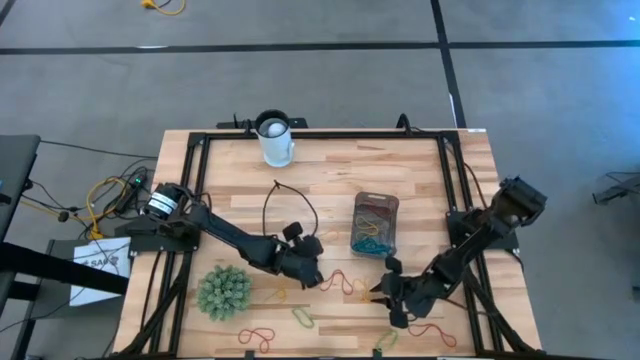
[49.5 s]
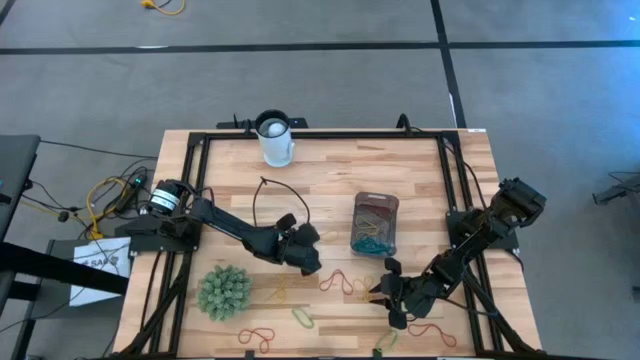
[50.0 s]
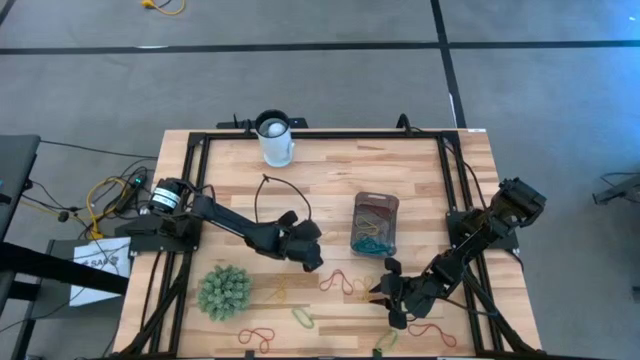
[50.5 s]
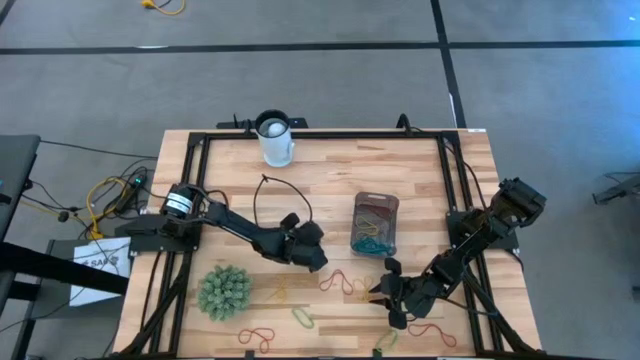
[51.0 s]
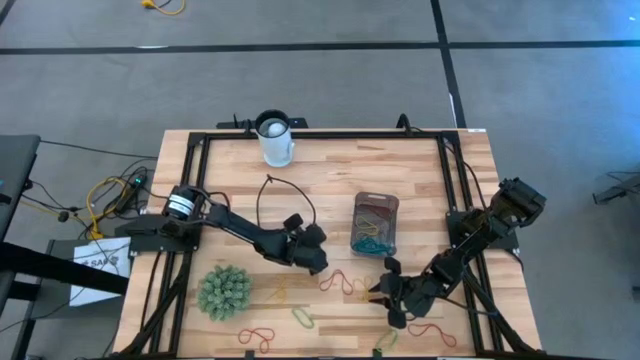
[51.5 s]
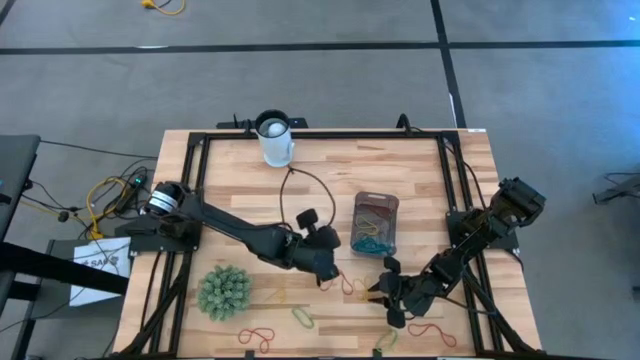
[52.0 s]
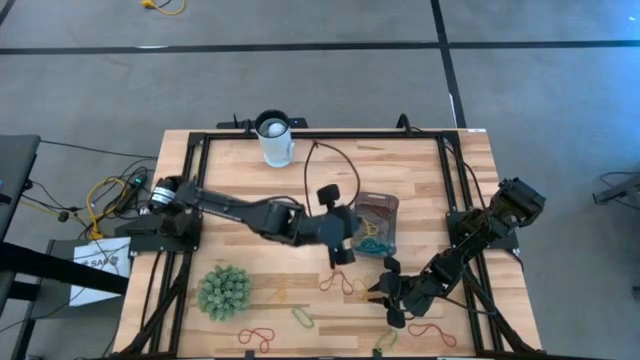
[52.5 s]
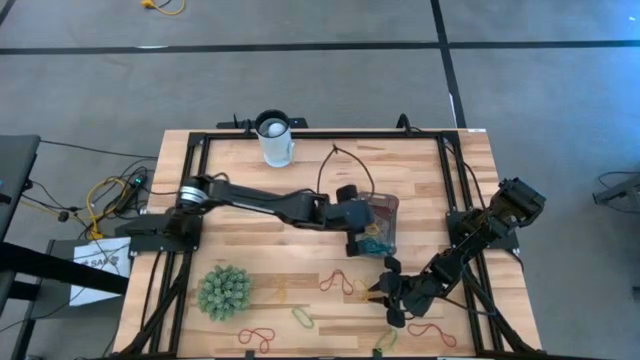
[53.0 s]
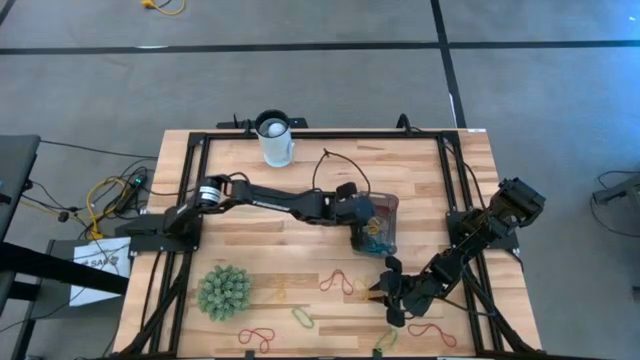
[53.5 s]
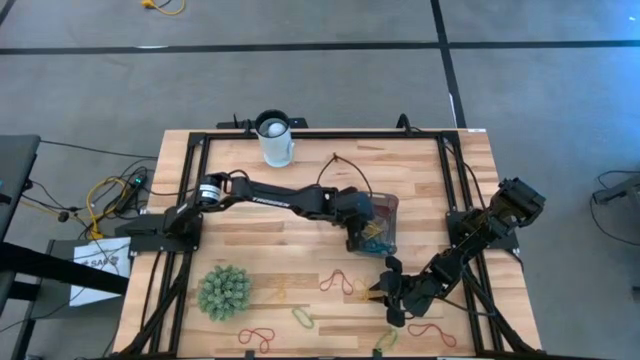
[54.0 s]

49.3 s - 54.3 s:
Task: Pick and place items into bin
Put the yellow rubber band into the black bin

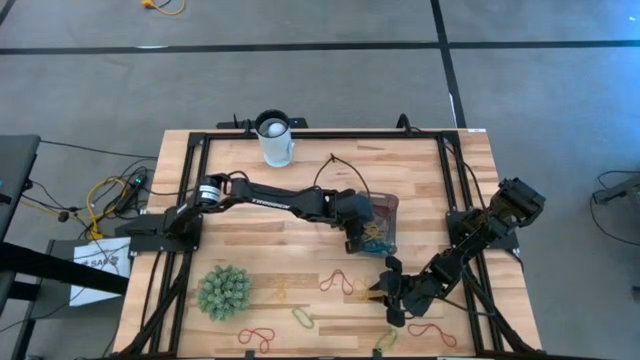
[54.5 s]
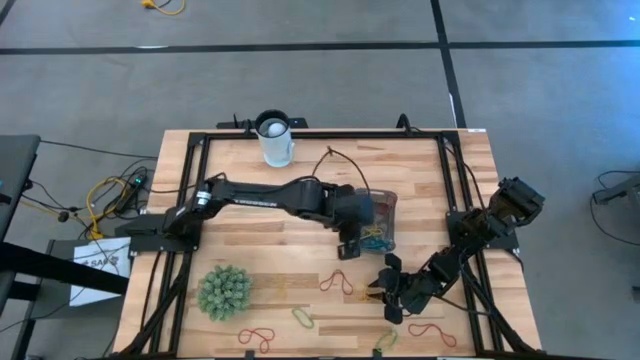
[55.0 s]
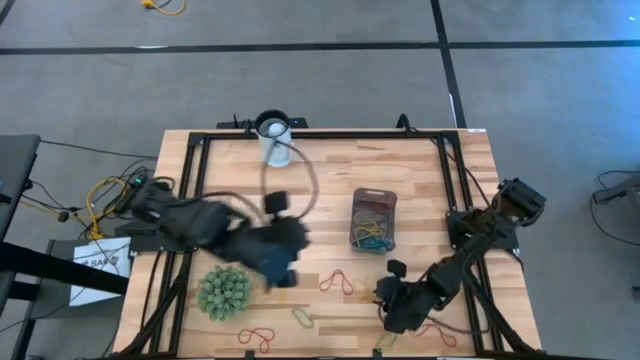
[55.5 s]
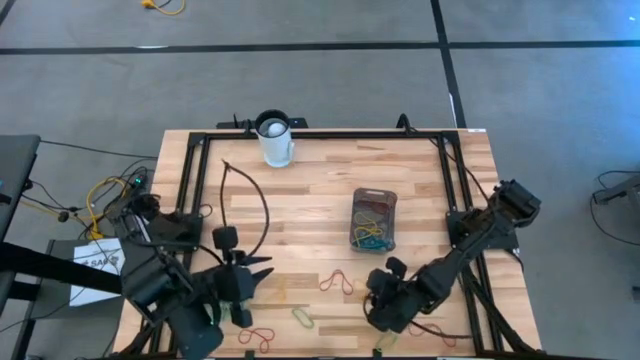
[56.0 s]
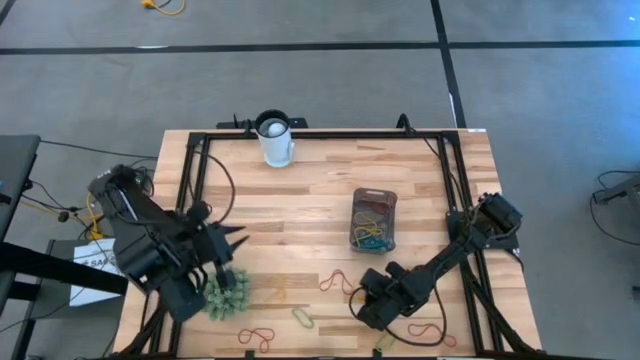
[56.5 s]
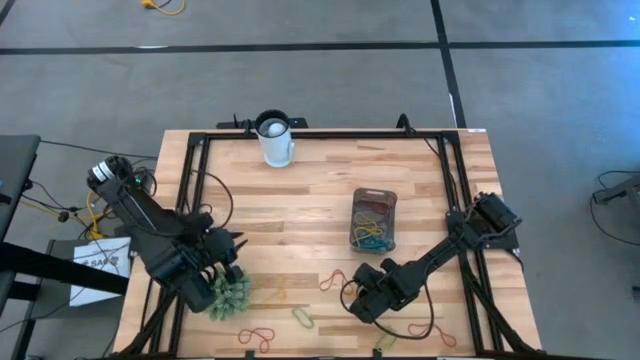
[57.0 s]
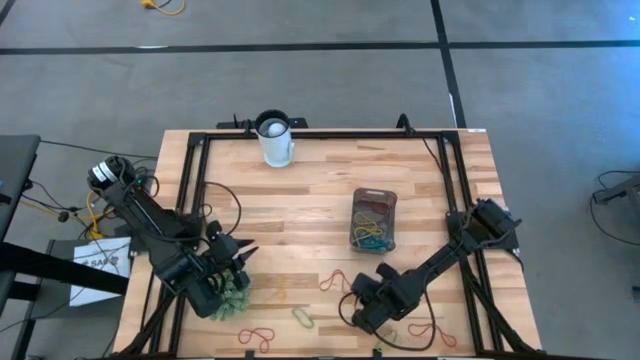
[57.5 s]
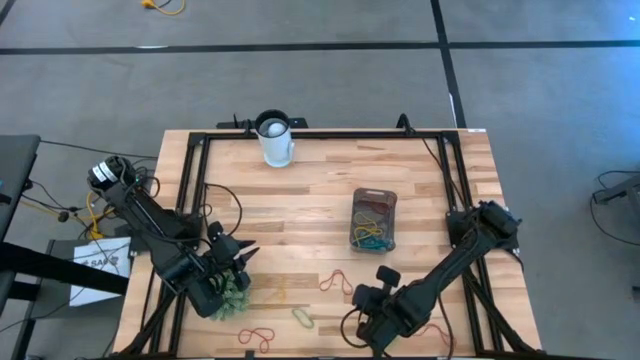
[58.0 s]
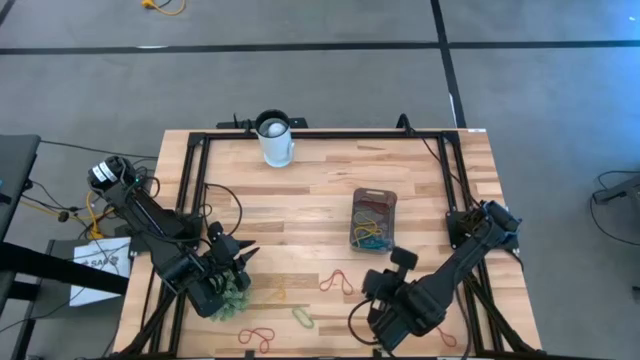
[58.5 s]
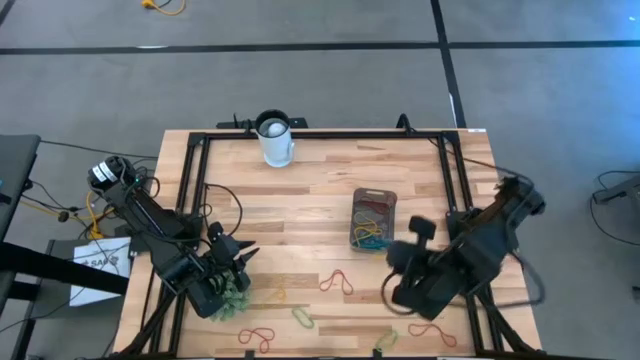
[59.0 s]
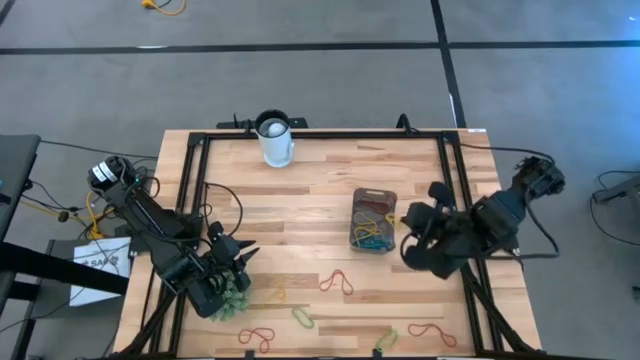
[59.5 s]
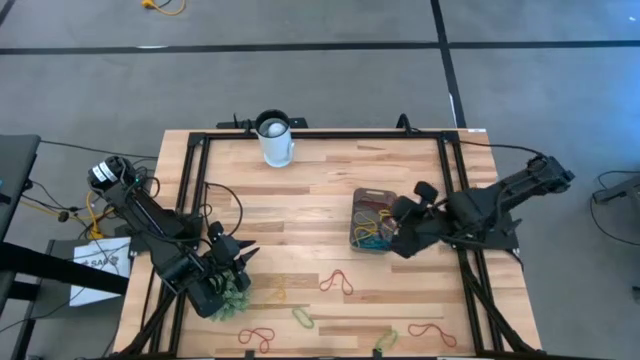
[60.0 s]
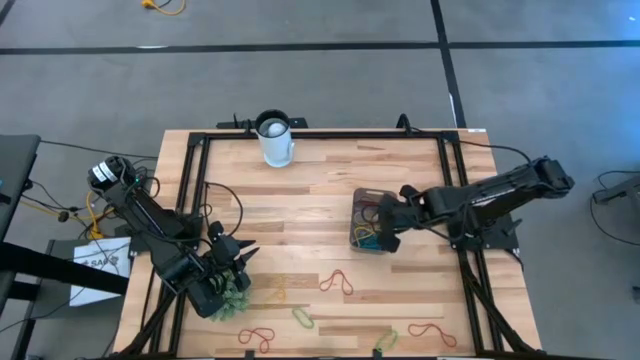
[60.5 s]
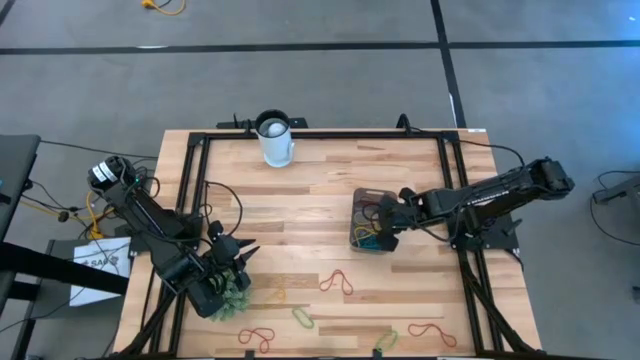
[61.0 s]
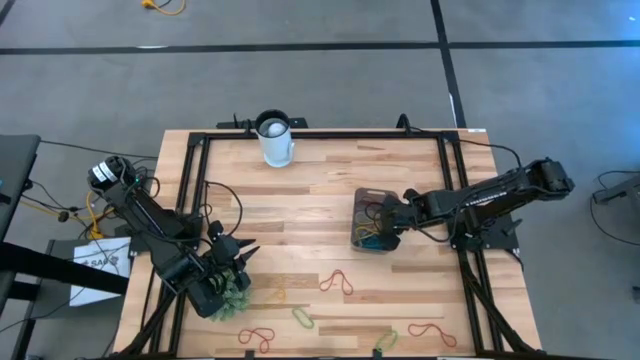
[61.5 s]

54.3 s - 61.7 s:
Put the yellow rubber band into the black bin

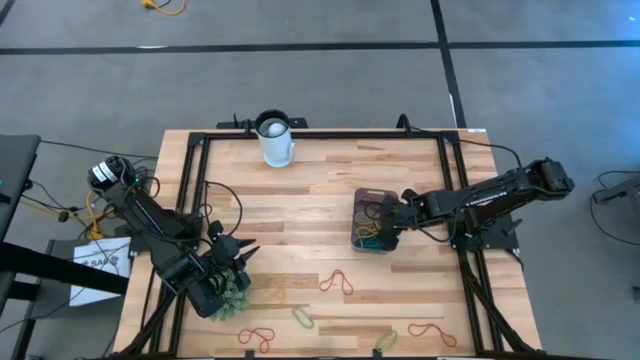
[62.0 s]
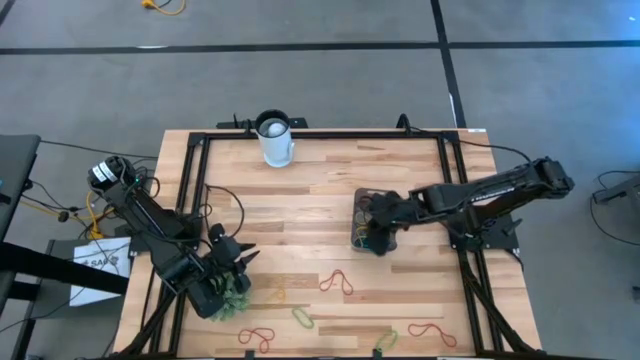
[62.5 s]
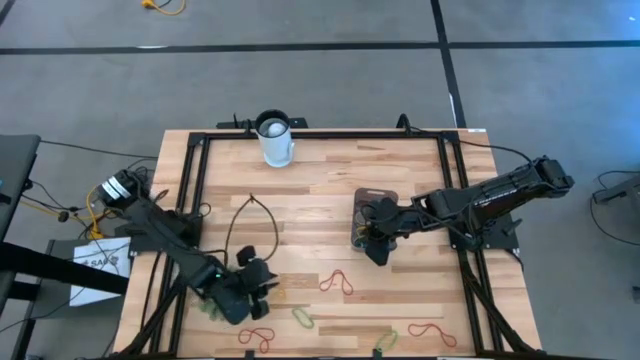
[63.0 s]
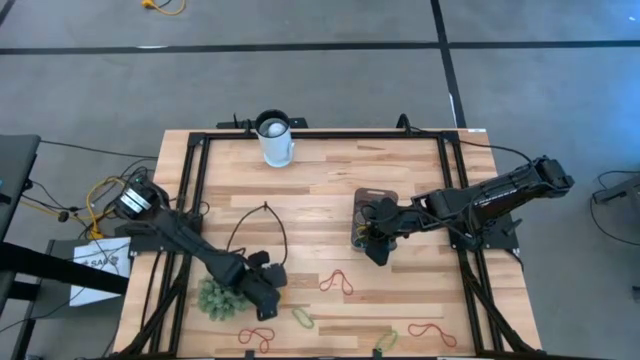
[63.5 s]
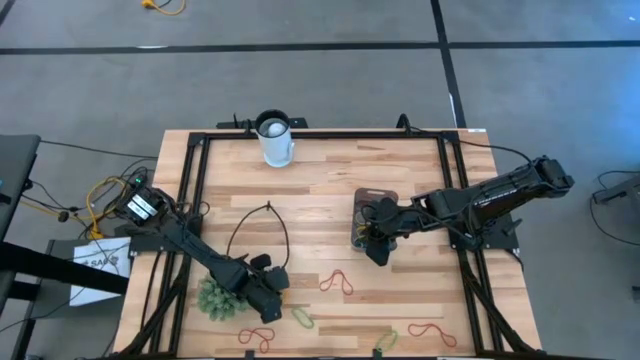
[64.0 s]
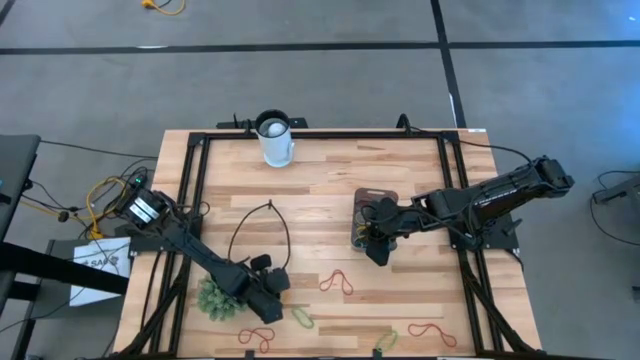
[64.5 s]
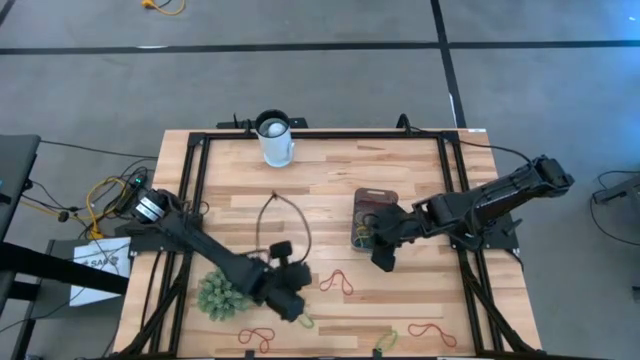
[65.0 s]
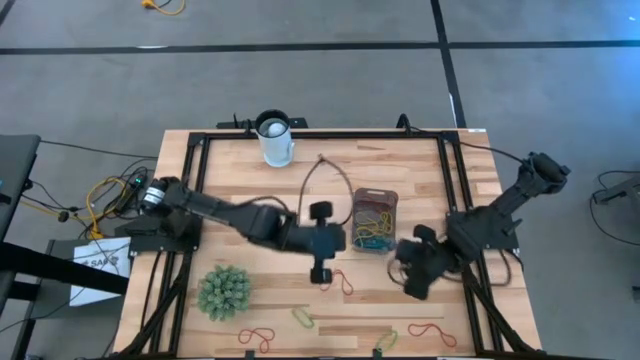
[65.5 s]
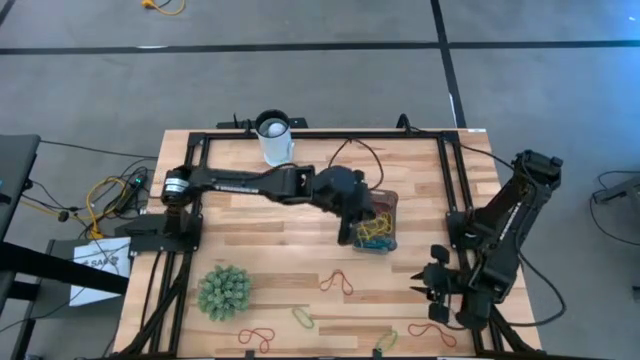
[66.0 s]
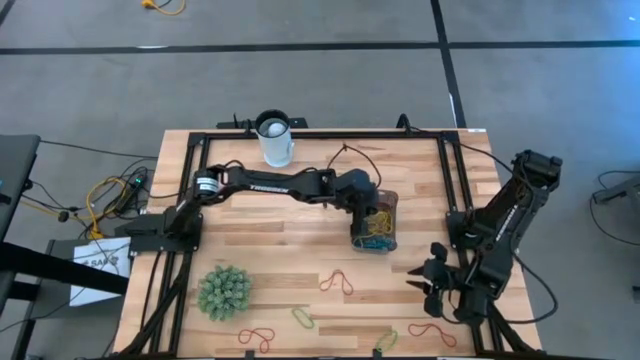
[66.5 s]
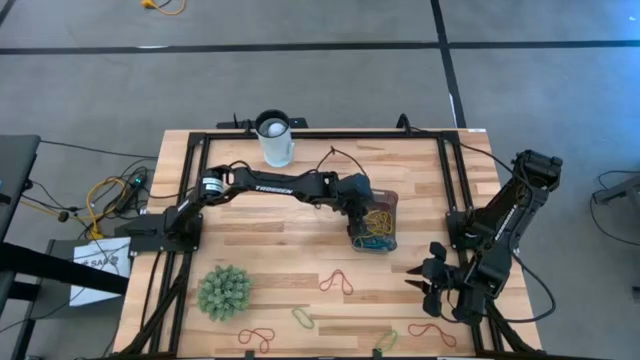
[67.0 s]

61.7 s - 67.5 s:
Put the yellow rubber band into the black bin

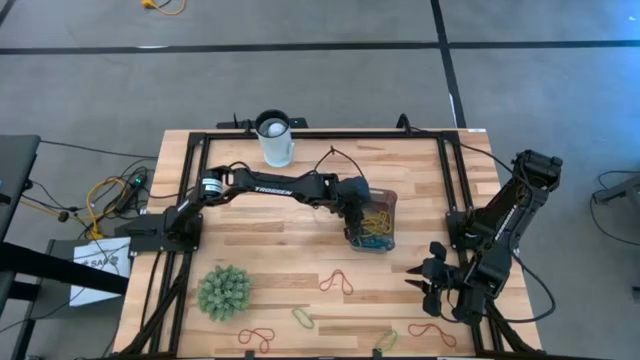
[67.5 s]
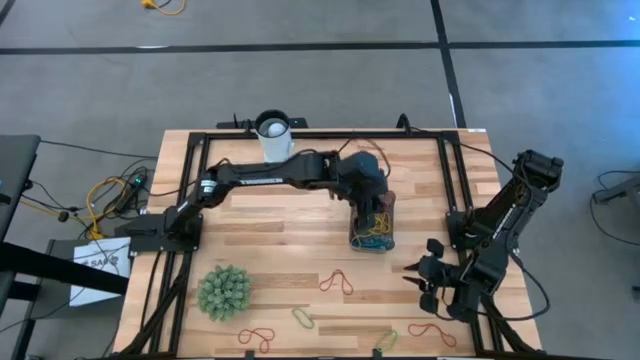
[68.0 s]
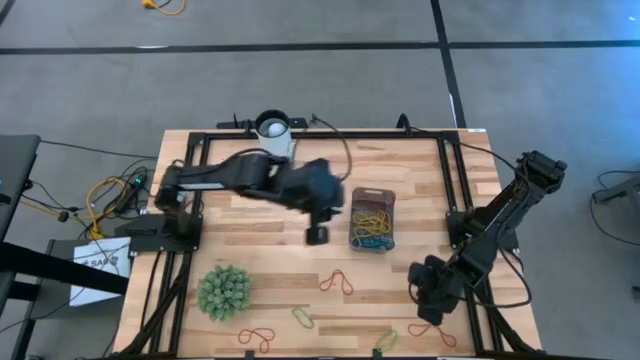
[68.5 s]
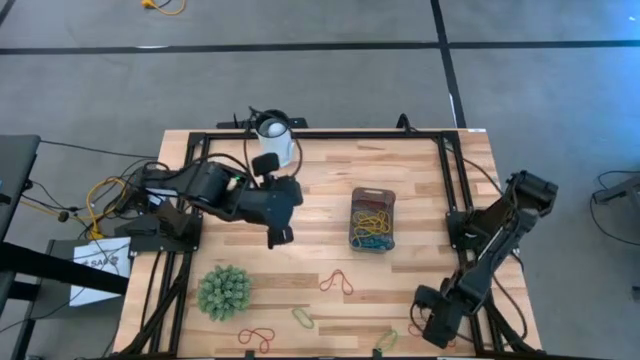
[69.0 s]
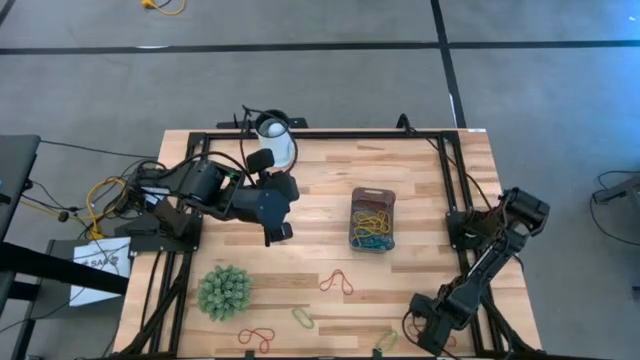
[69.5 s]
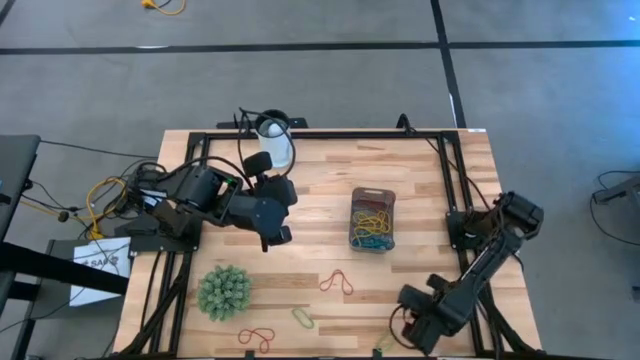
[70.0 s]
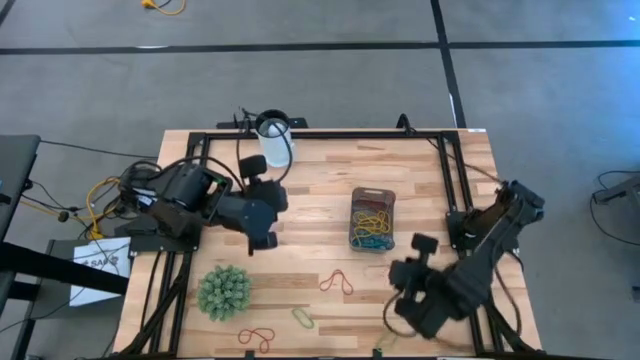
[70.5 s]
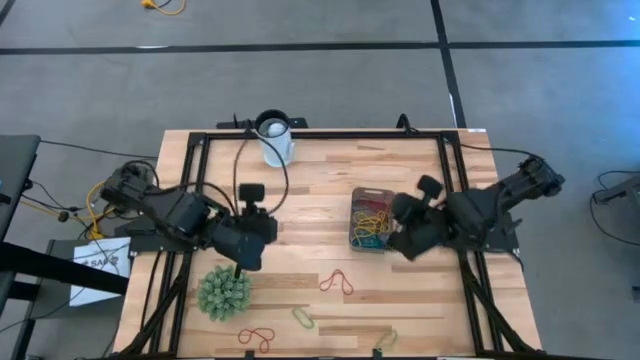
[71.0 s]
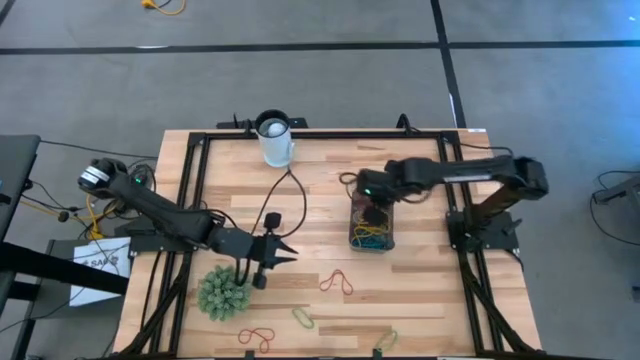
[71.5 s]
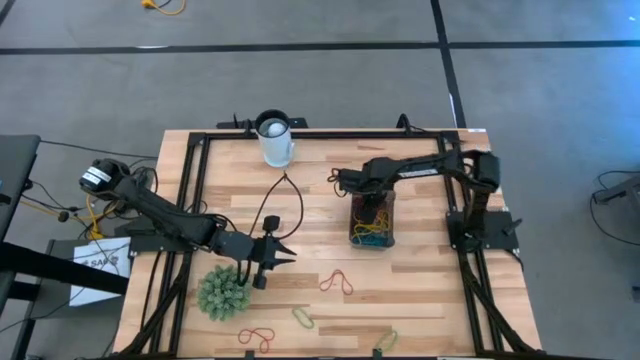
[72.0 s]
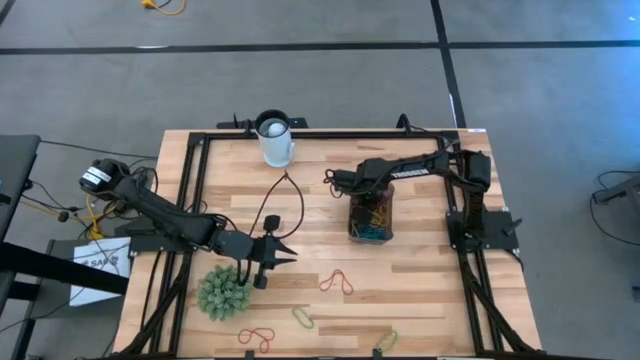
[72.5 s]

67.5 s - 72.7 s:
Put the red rubber band into the black bin
